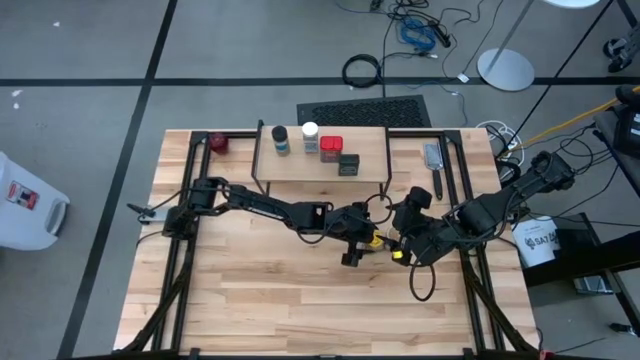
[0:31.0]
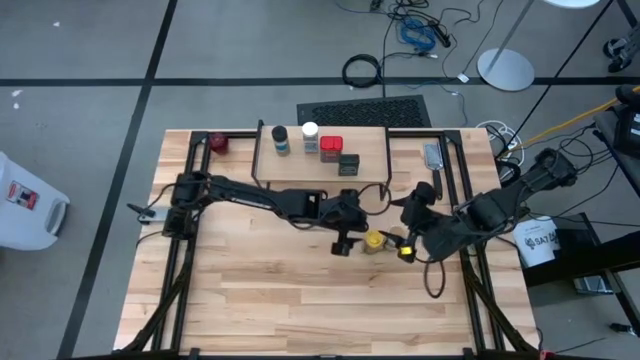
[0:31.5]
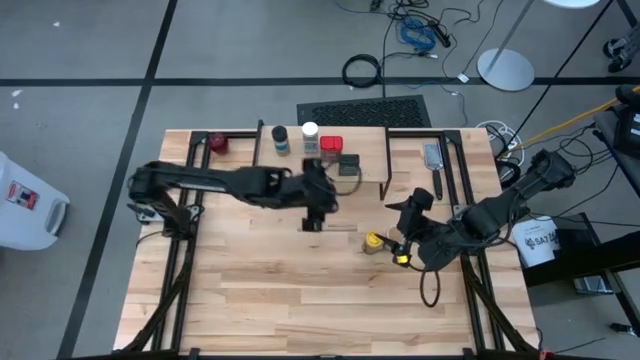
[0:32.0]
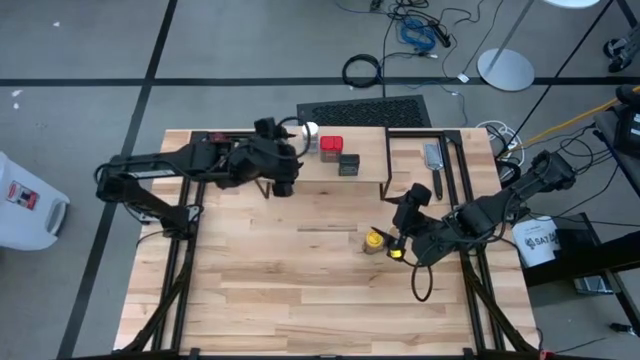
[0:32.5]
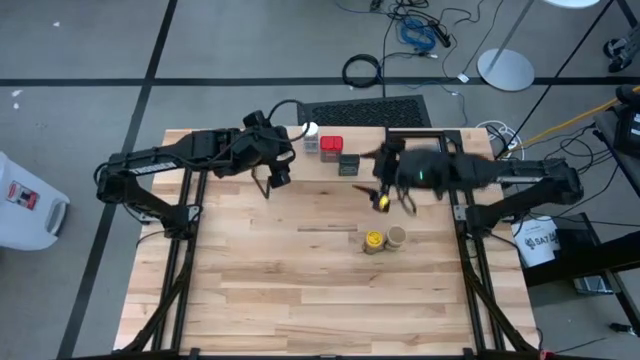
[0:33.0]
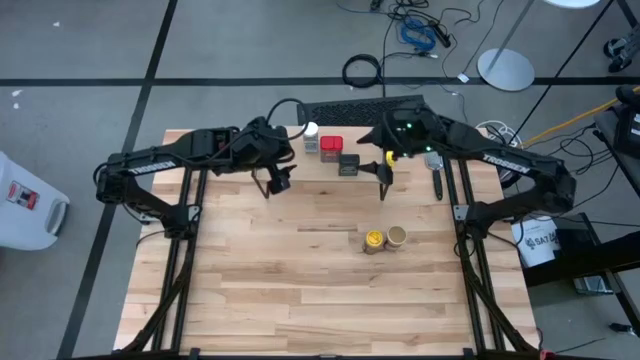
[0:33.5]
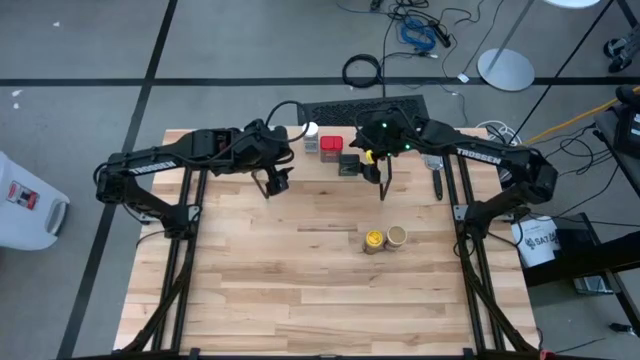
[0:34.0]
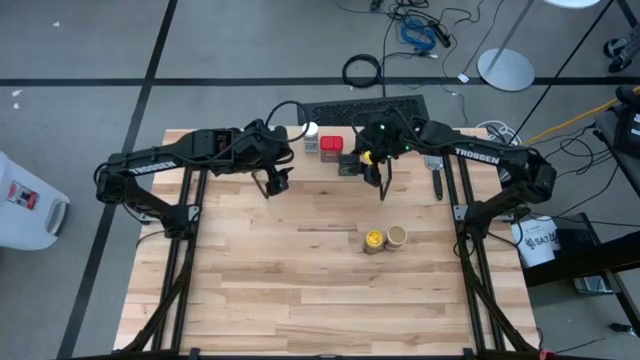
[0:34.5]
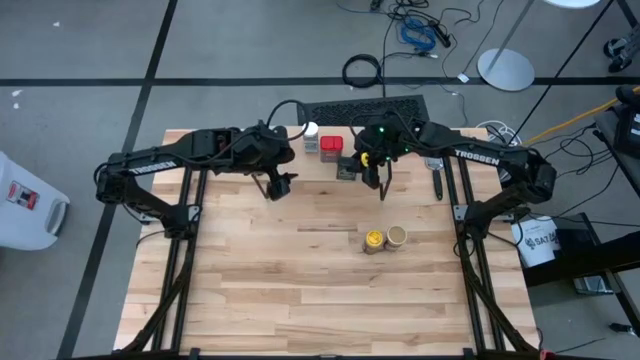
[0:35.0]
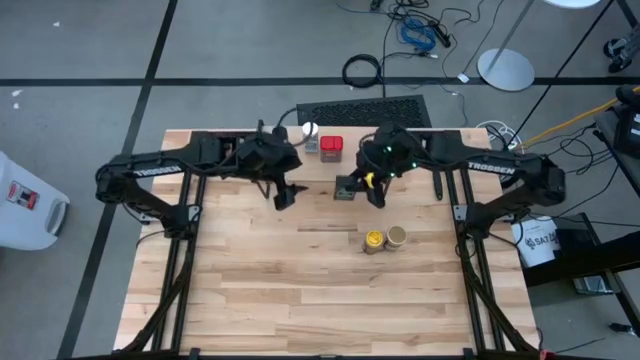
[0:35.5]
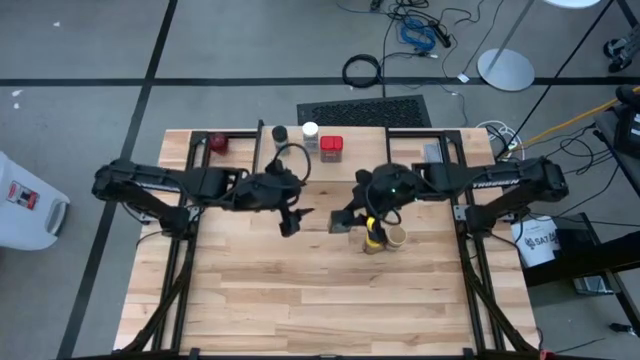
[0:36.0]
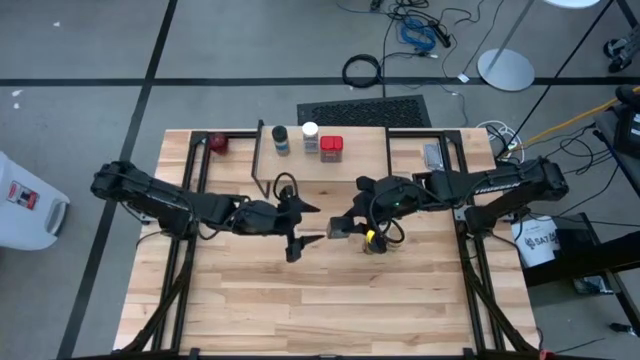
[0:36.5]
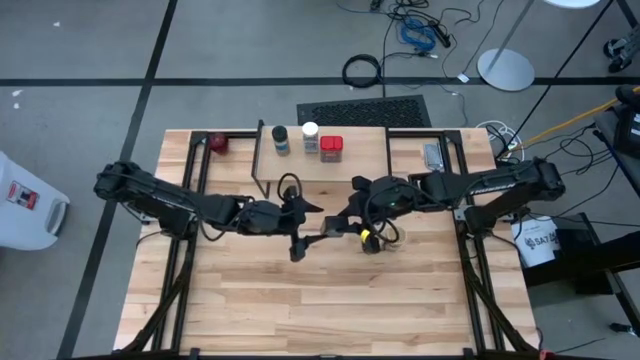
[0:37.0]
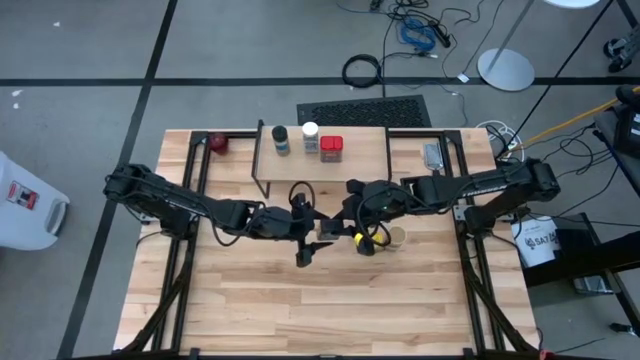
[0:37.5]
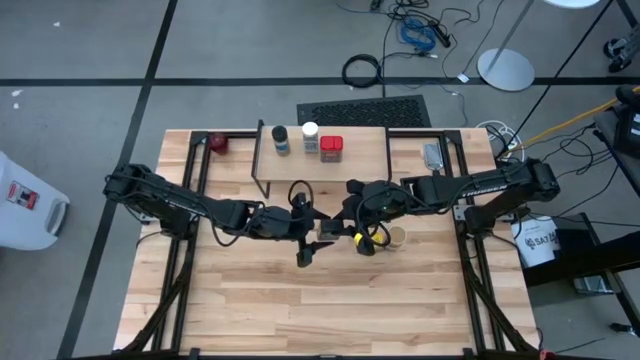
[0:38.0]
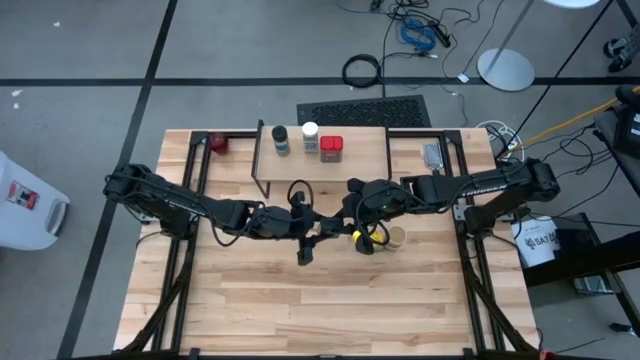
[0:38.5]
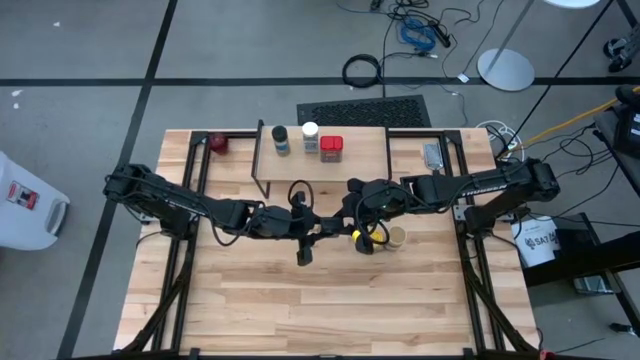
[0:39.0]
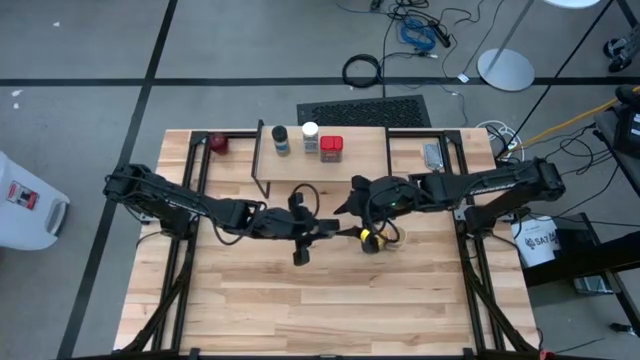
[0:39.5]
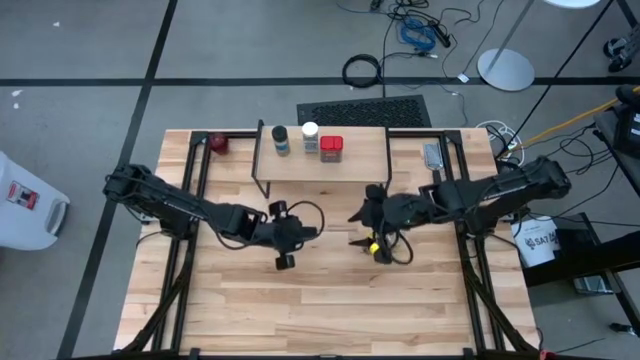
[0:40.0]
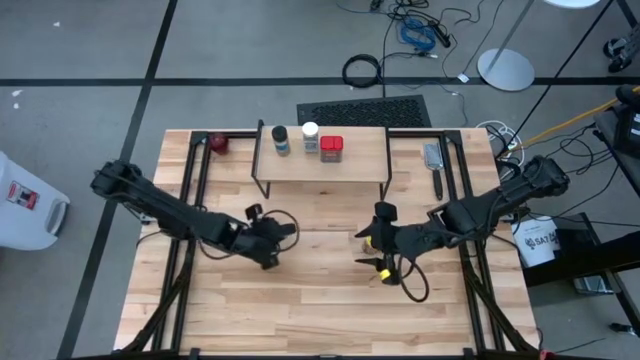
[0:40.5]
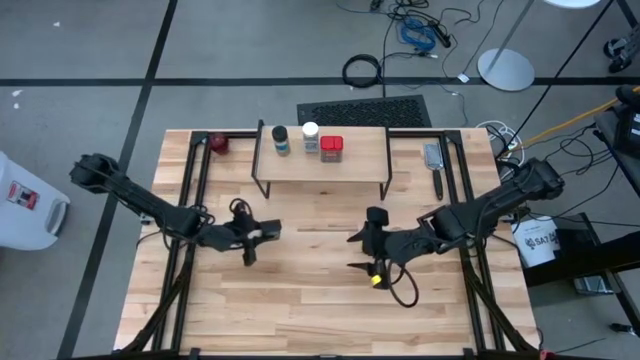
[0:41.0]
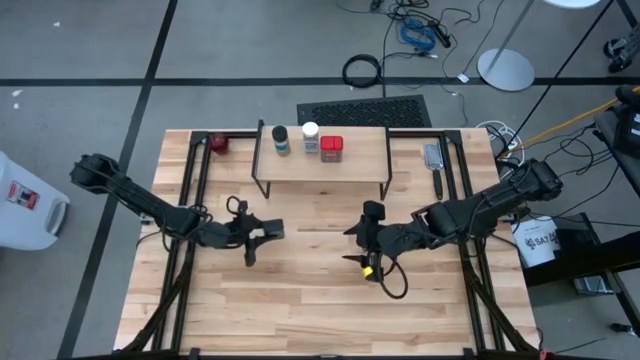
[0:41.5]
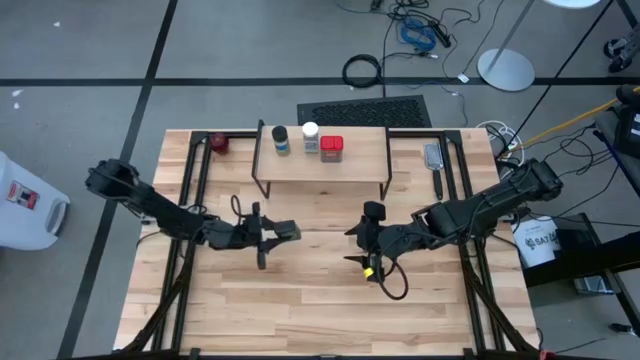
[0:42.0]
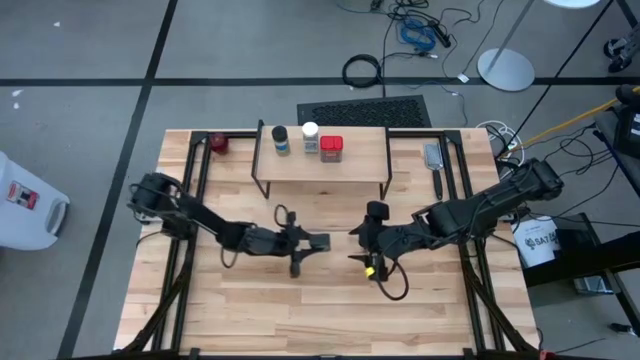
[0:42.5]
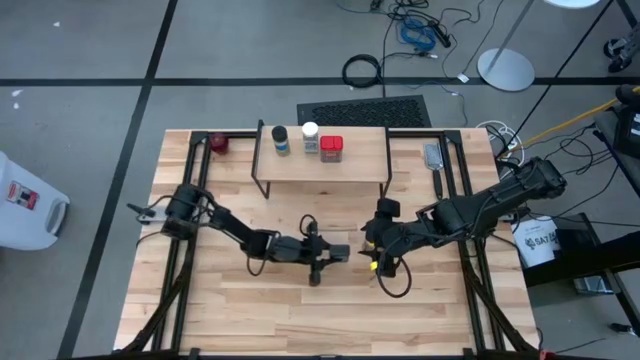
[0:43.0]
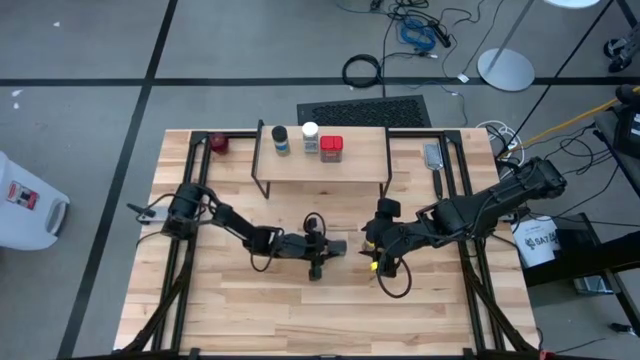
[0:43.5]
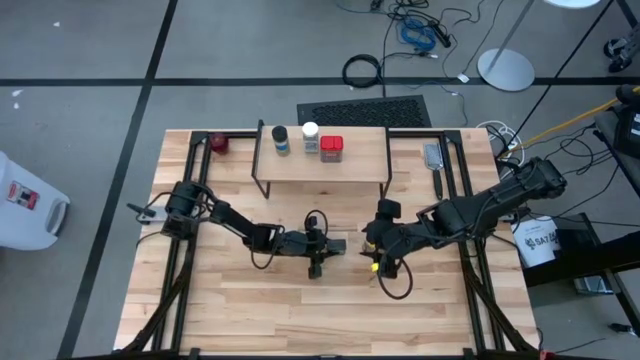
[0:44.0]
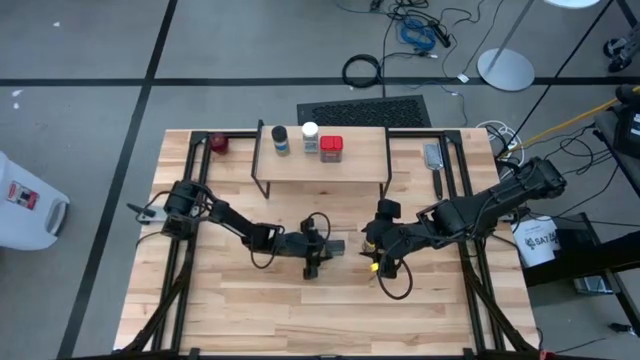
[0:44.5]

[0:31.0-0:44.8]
Task: Shelf spices
Remove the black seasoning can from the shelf

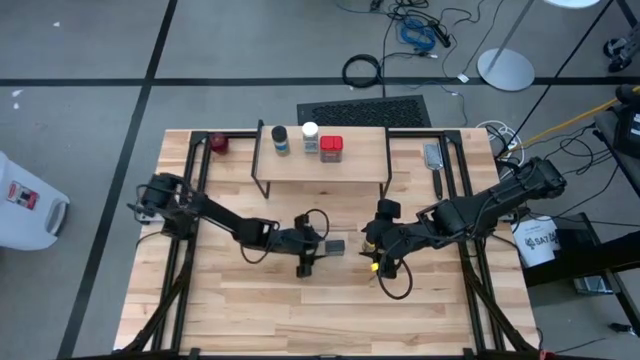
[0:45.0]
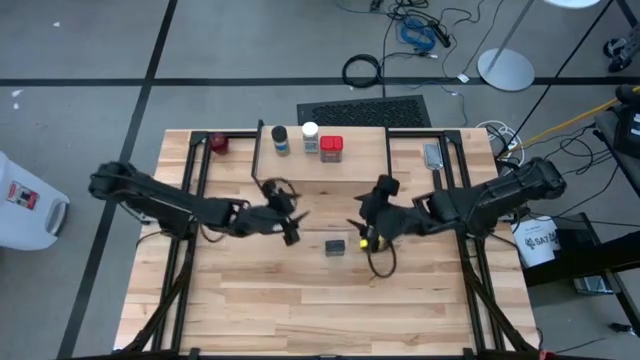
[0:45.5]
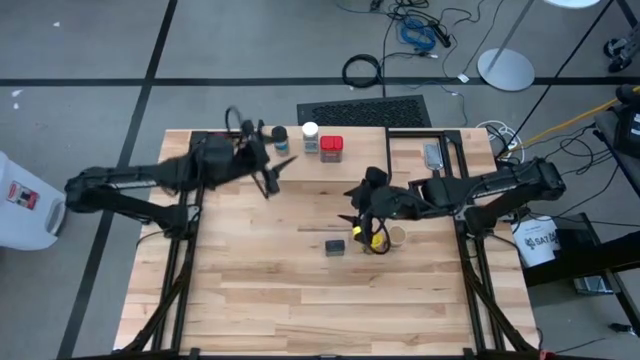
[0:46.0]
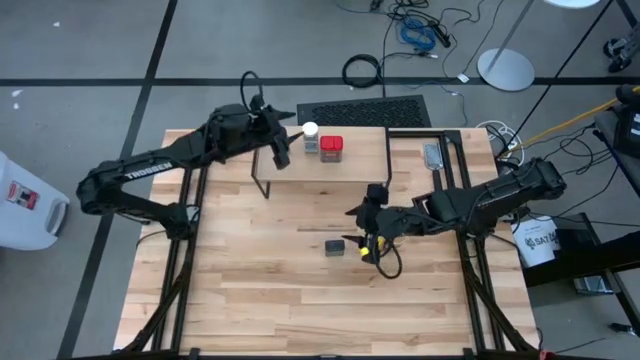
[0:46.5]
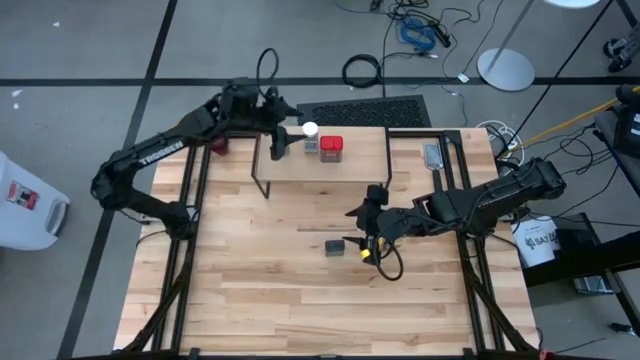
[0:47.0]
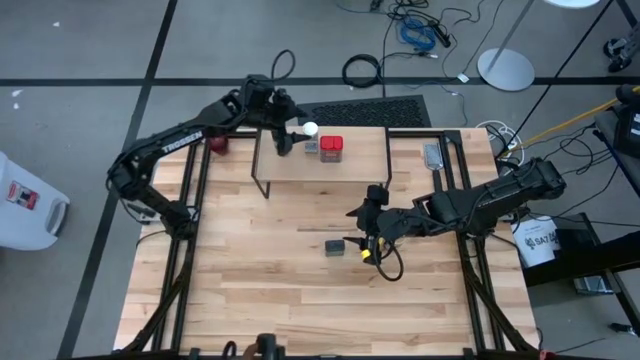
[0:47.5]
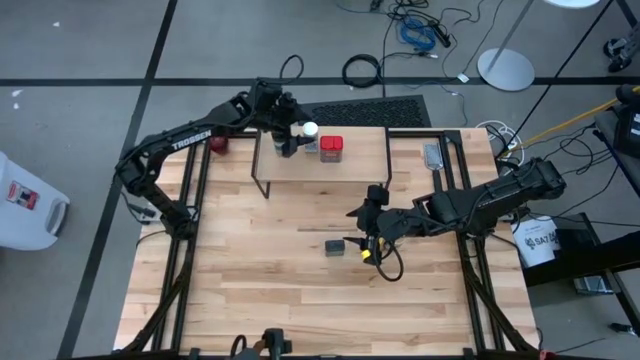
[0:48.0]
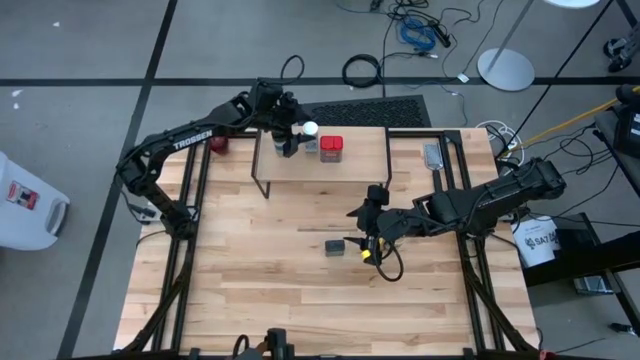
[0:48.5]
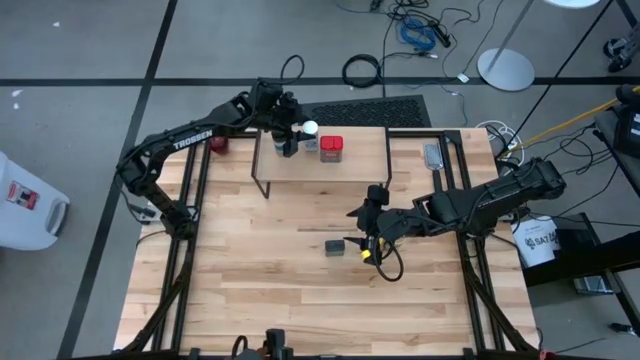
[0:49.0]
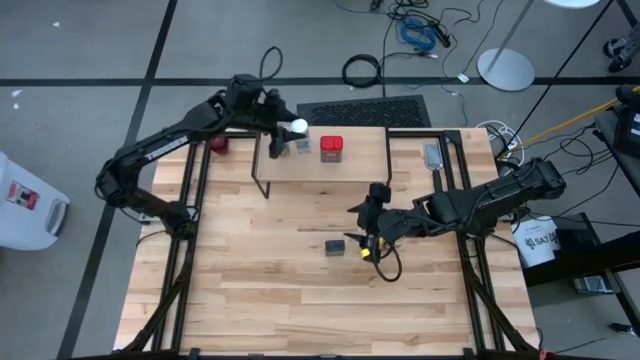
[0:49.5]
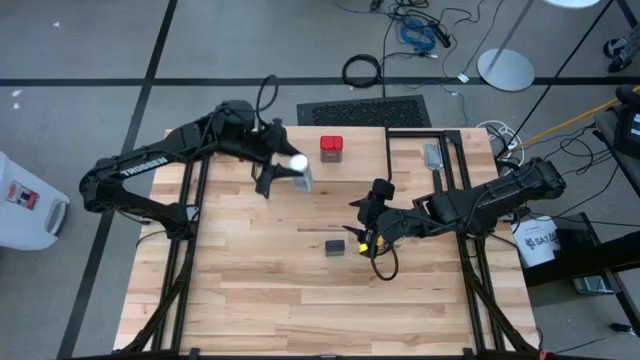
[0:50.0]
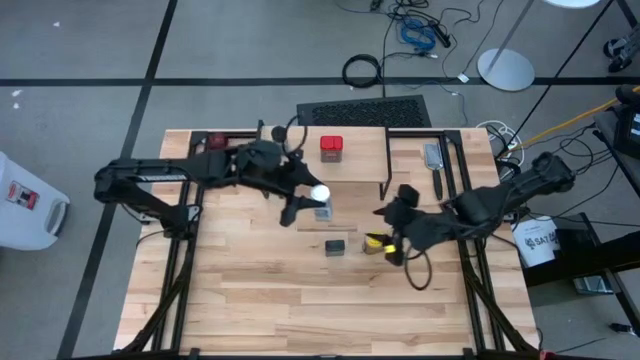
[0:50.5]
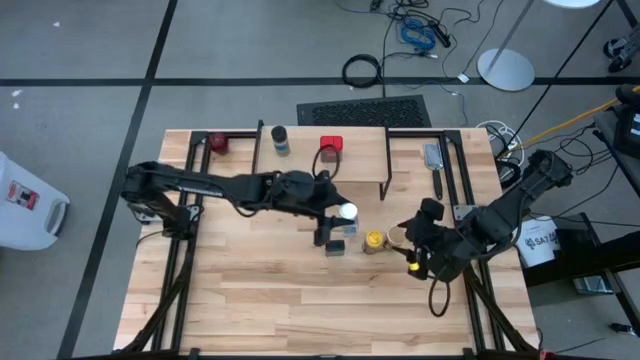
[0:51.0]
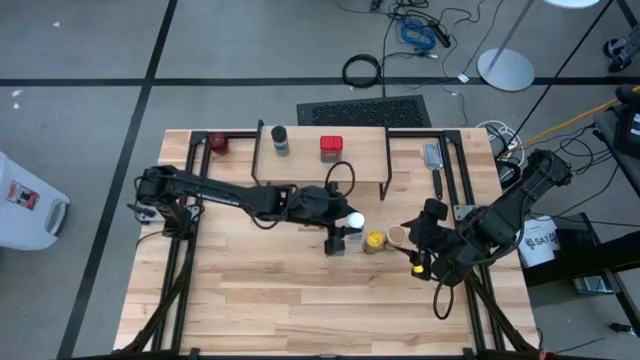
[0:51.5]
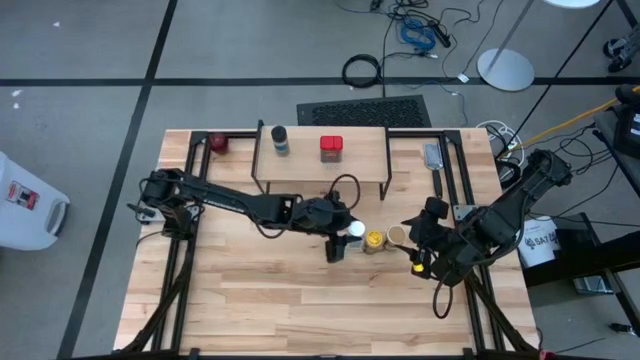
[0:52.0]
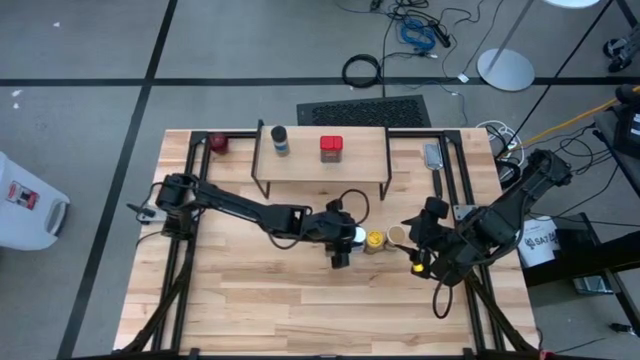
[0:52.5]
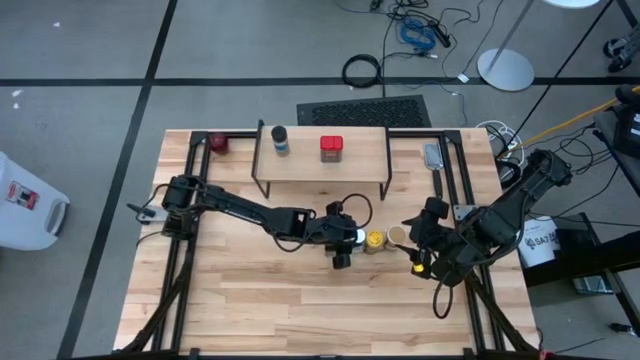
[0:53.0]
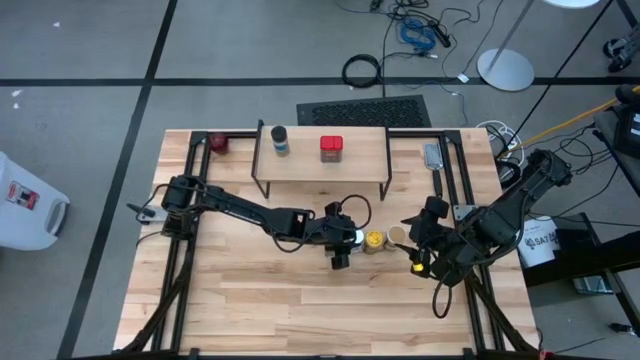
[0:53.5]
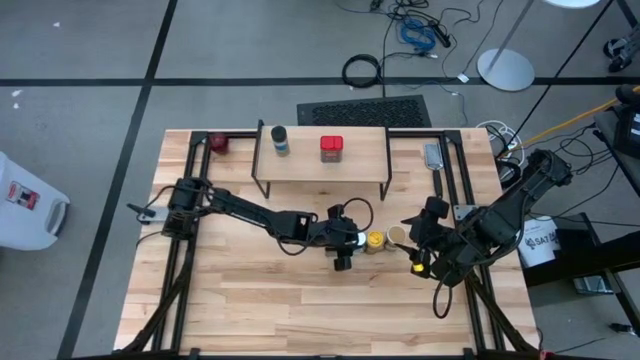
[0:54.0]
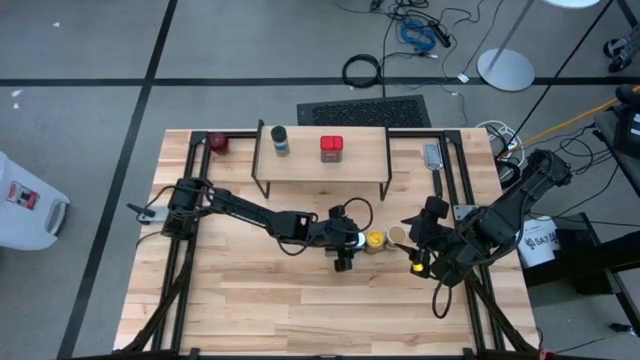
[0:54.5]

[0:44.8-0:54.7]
Remove the white seasoning bottle from the shelf
